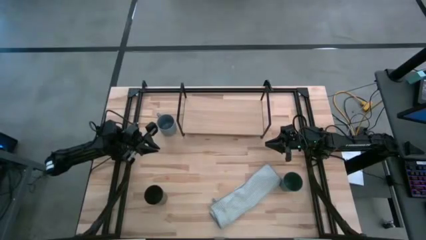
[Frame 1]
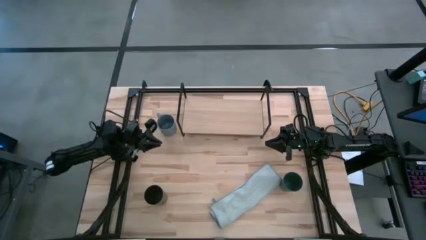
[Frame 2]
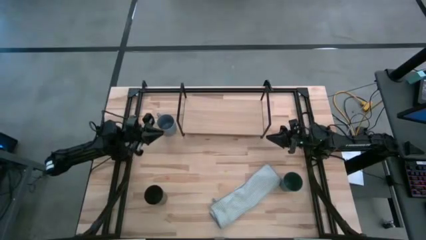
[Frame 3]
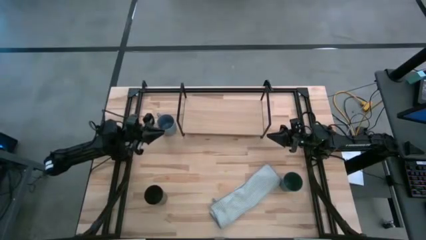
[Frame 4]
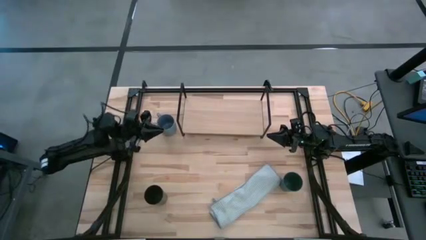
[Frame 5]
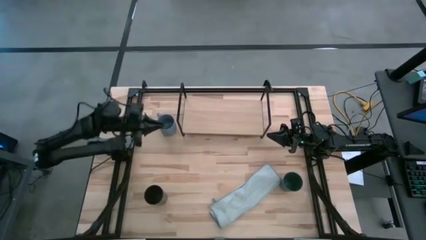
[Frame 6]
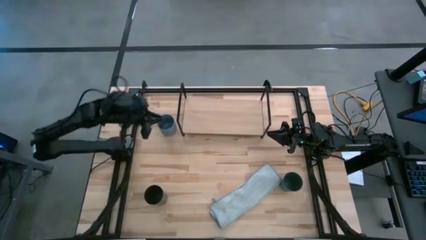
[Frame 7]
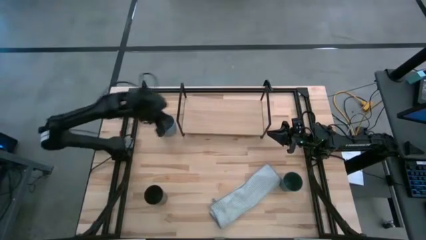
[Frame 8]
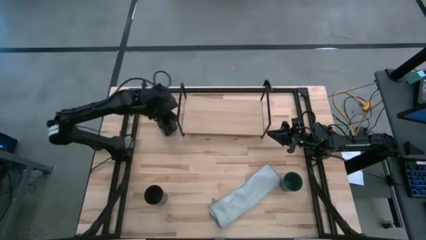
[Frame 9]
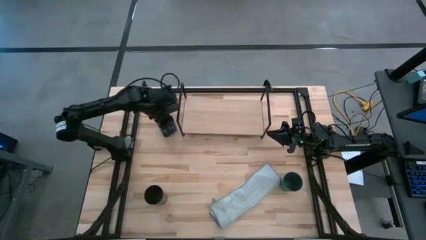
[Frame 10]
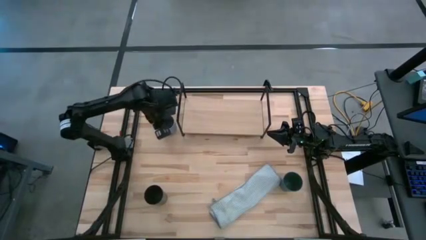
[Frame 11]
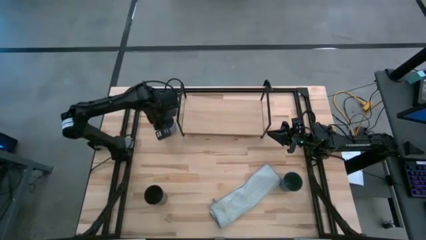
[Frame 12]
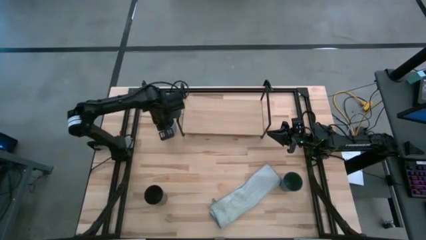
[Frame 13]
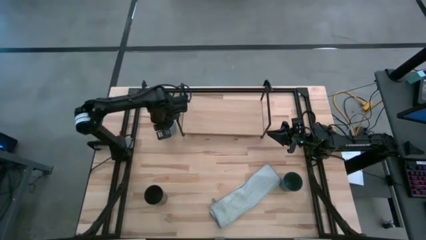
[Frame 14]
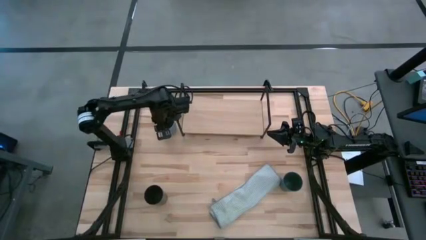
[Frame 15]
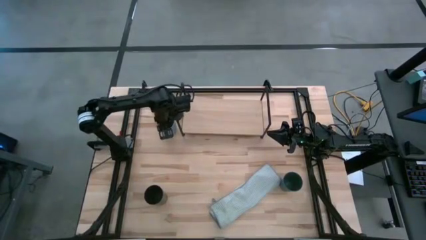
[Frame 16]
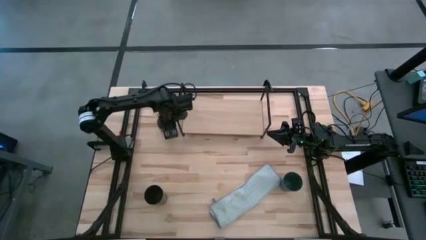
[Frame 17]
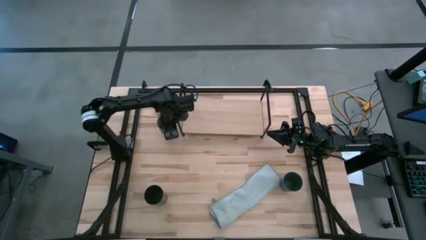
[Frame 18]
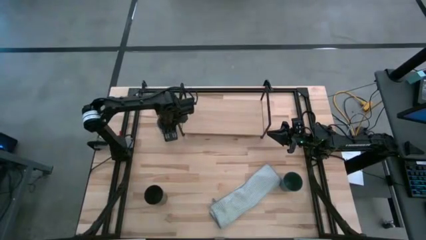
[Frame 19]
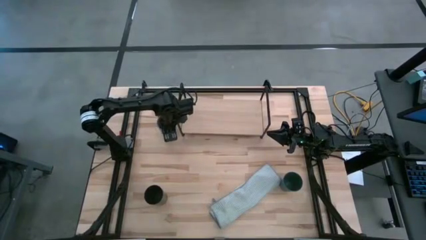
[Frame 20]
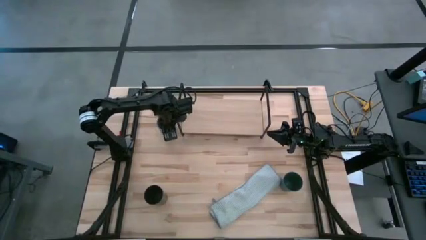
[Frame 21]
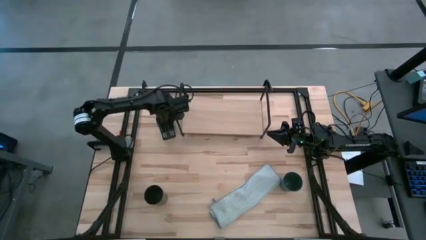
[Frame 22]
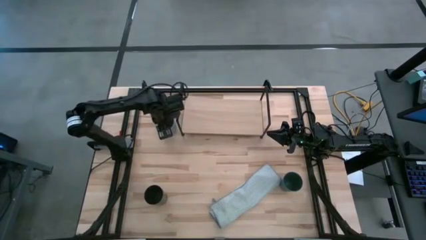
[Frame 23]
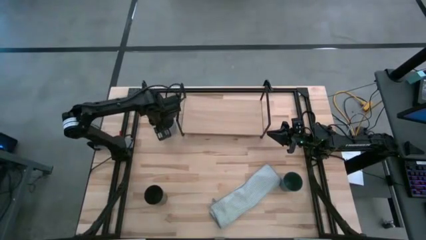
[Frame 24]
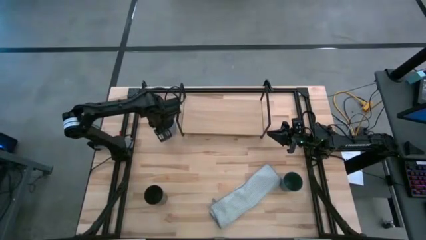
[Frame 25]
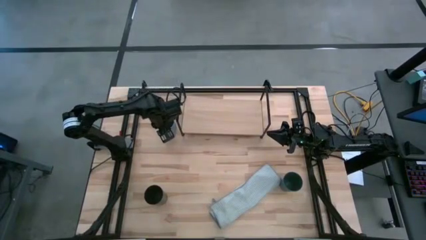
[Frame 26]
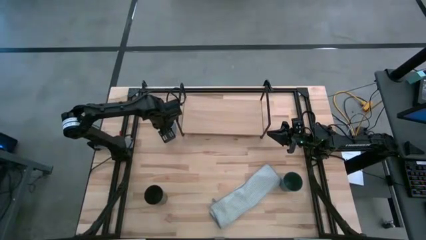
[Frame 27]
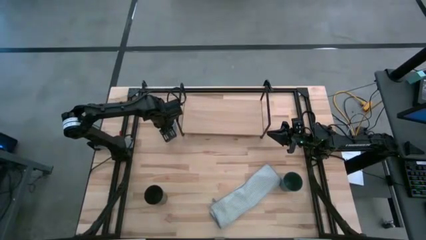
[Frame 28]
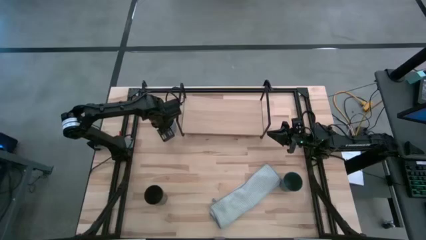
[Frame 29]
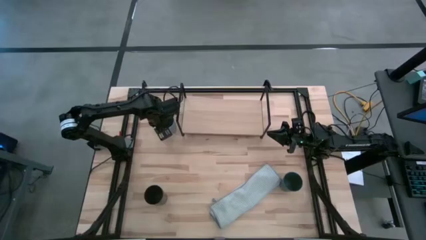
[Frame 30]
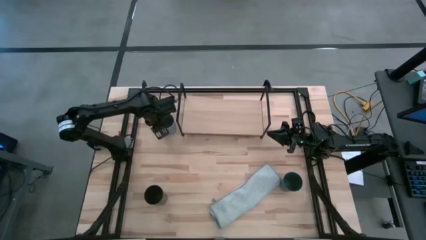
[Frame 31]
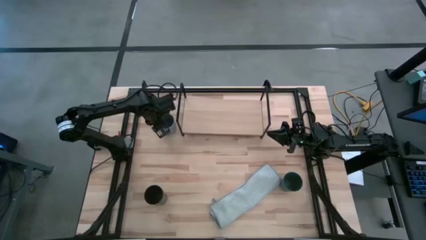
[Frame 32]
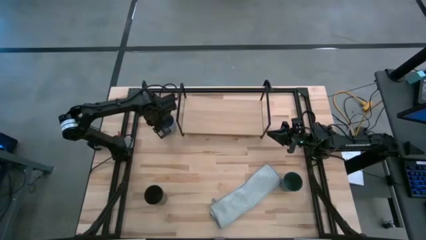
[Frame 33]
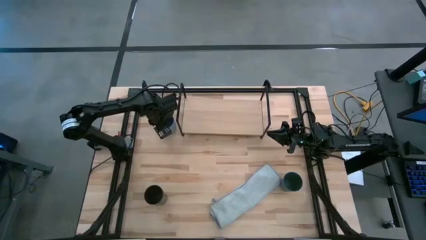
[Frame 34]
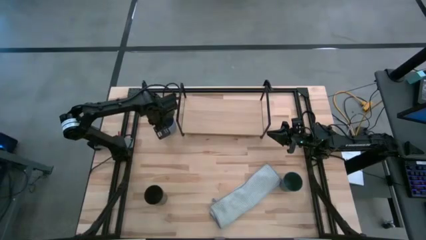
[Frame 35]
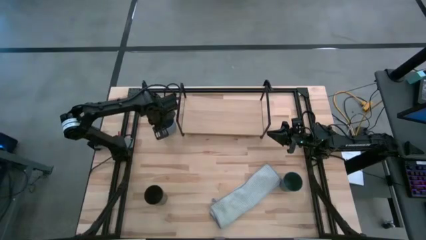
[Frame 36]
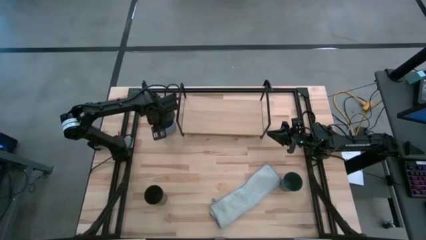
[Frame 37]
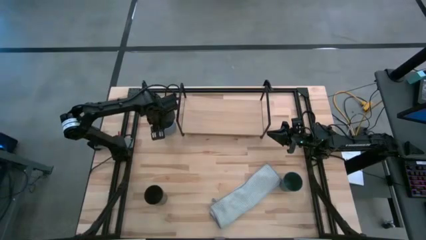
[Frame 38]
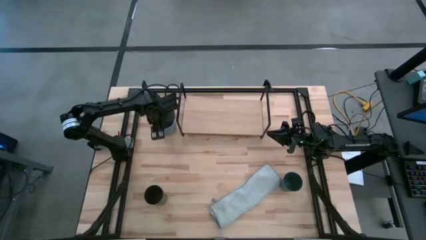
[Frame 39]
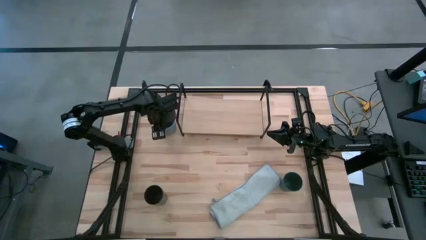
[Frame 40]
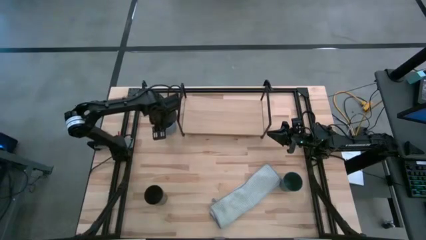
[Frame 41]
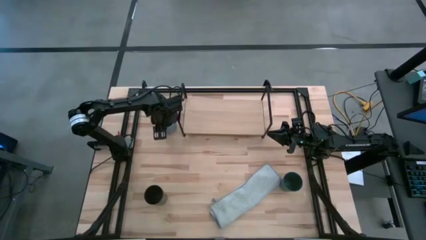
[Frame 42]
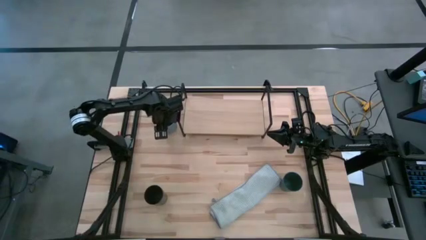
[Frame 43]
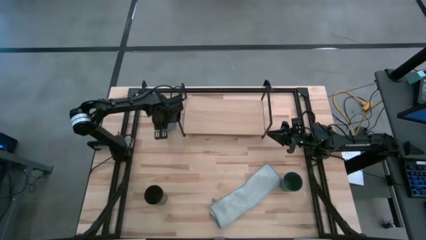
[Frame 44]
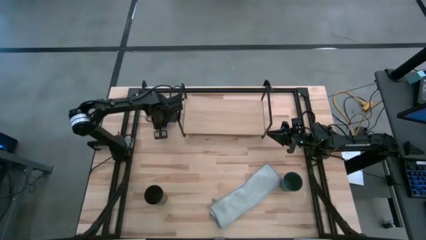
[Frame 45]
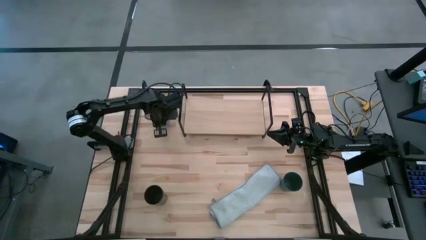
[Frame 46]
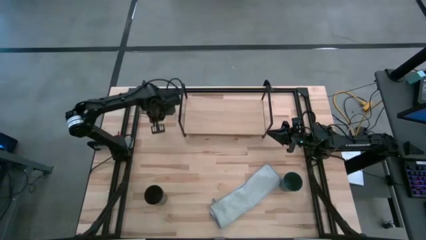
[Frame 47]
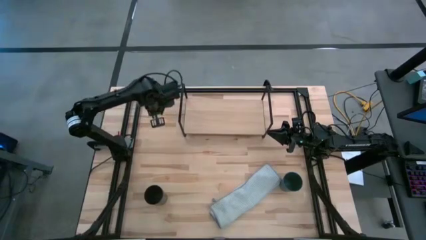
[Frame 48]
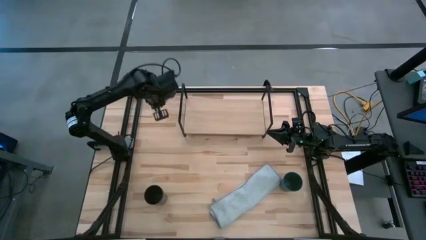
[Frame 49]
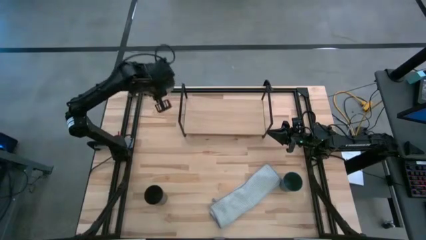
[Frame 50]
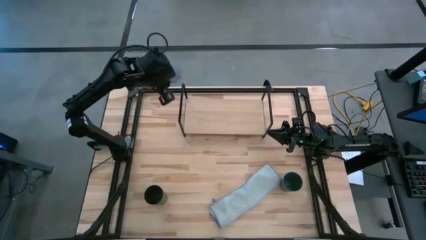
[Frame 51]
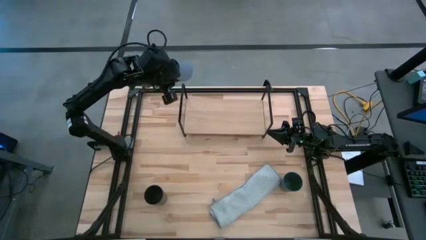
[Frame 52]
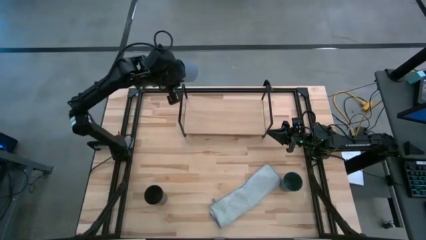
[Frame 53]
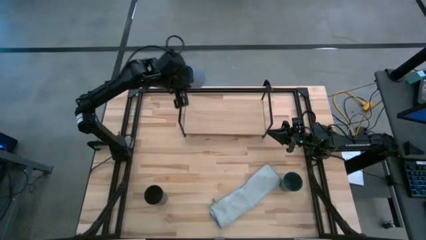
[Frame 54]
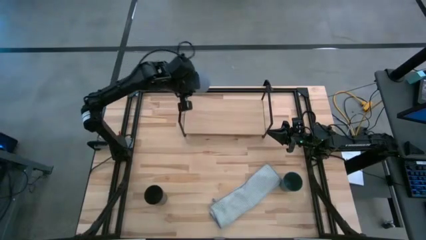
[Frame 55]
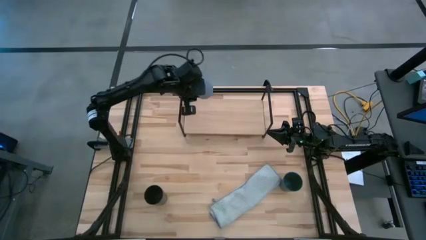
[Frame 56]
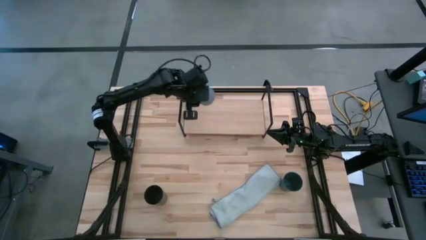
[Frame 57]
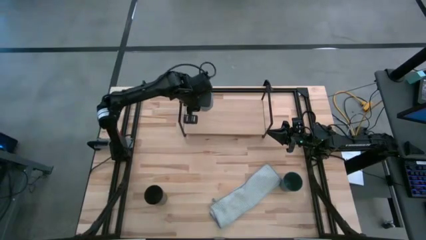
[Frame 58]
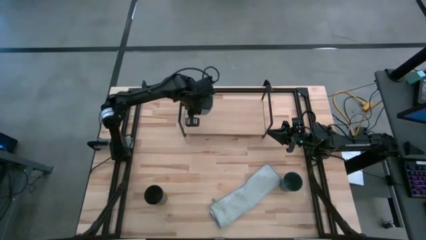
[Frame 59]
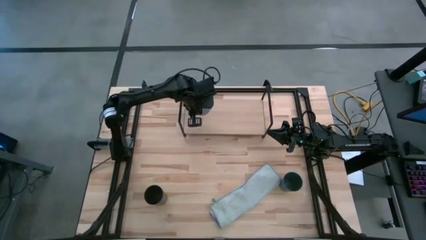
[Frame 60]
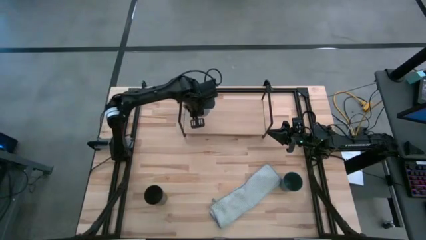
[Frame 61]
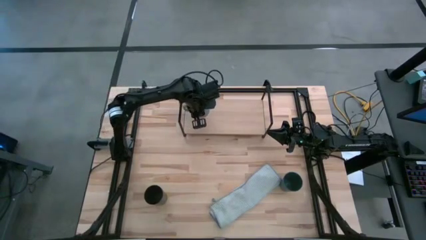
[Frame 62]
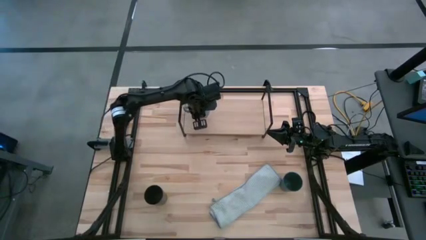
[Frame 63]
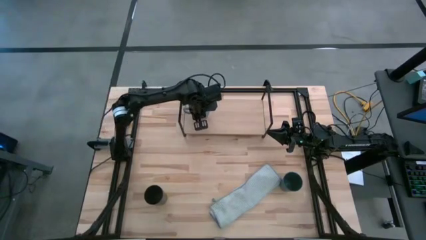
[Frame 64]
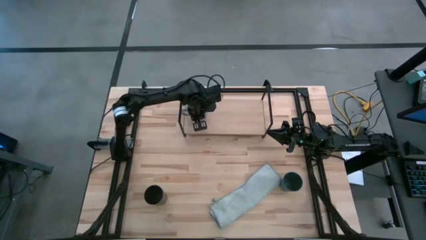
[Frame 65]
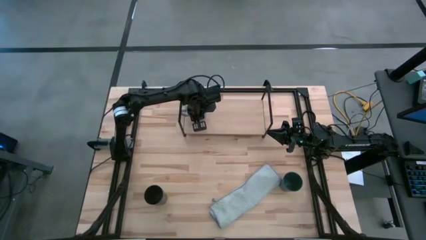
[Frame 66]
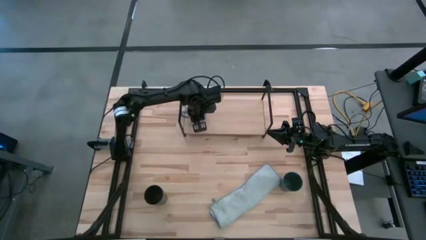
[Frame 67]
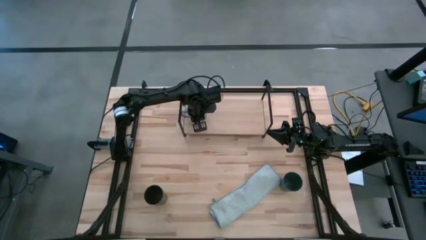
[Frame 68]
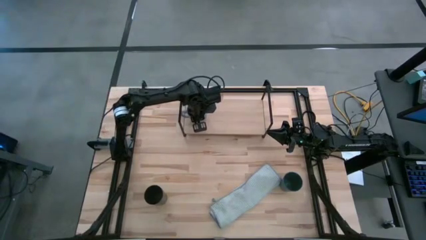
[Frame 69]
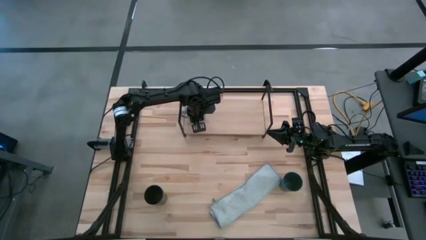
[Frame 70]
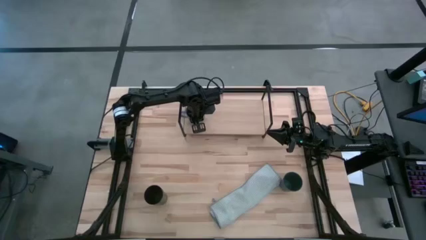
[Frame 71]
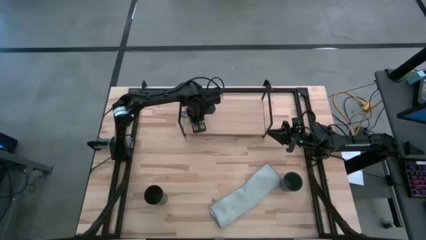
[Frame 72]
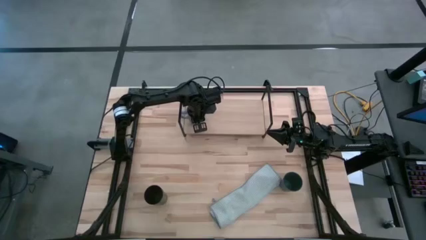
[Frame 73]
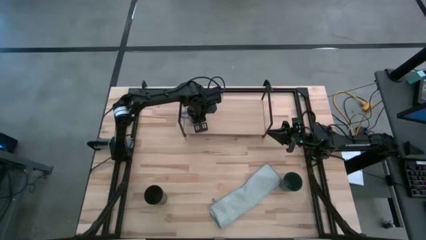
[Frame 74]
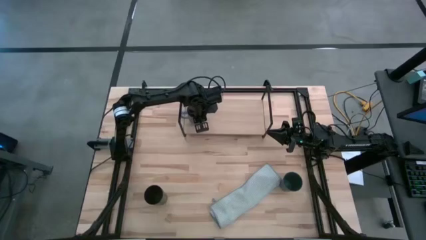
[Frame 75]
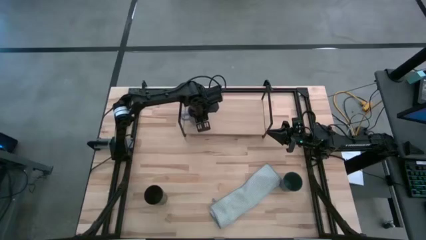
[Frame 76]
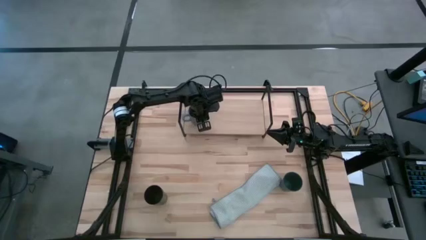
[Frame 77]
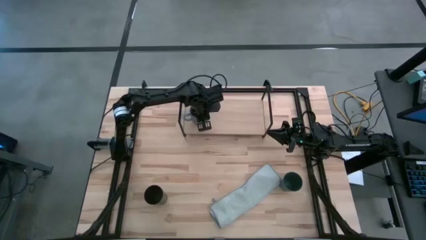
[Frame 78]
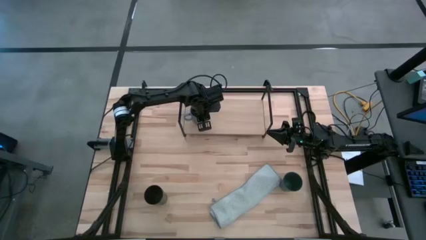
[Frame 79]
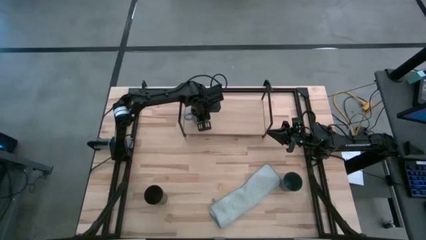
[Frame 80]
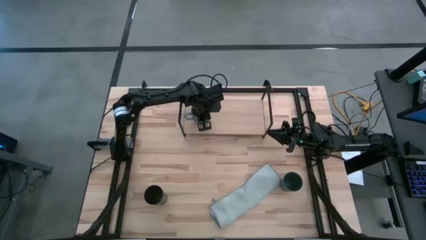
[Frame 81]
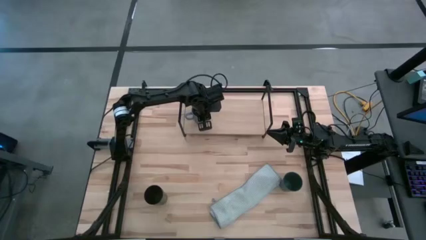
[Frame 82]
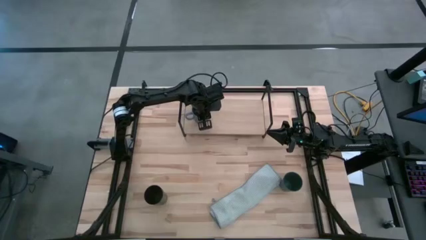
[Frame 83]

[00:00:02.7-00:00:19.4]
Task: Stack small to large cups/mugs on shelf
Put the blue mug on the shelf
